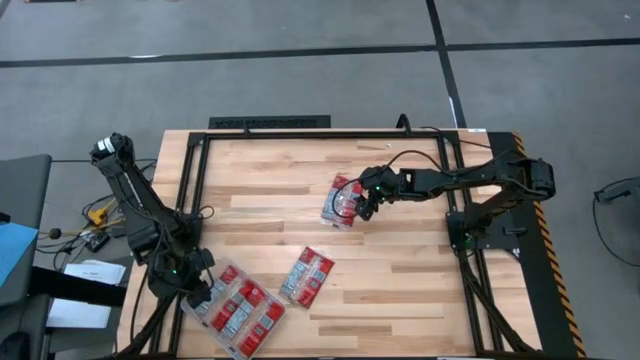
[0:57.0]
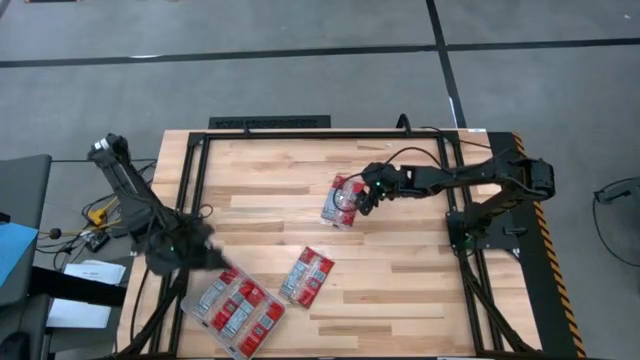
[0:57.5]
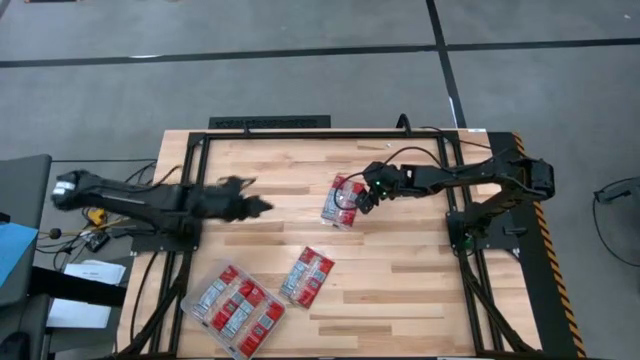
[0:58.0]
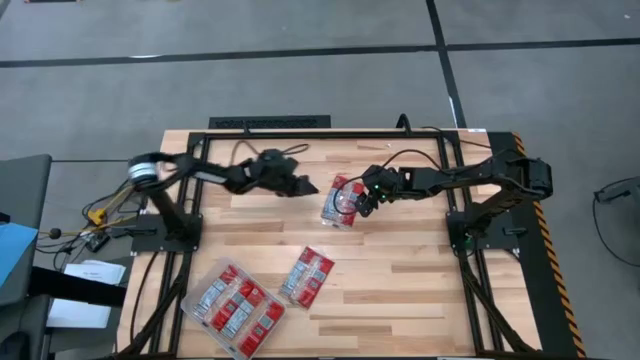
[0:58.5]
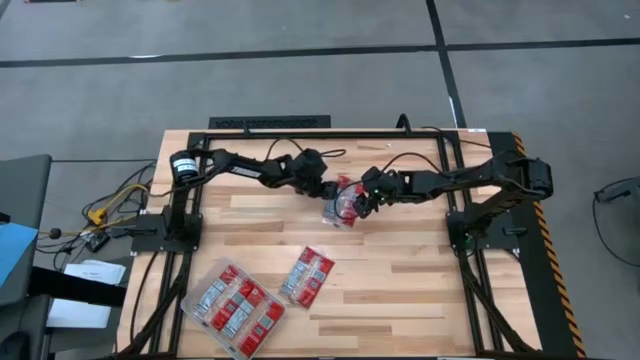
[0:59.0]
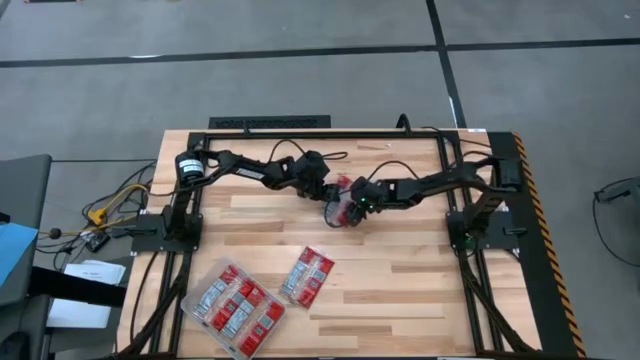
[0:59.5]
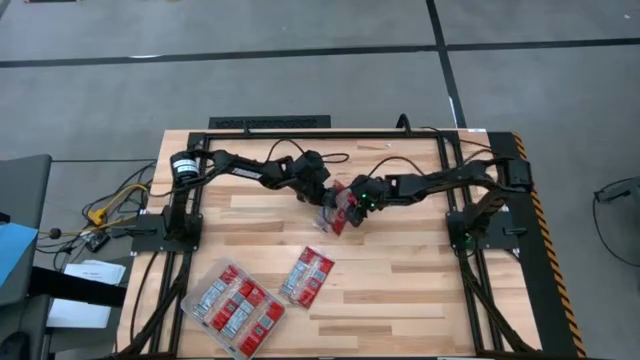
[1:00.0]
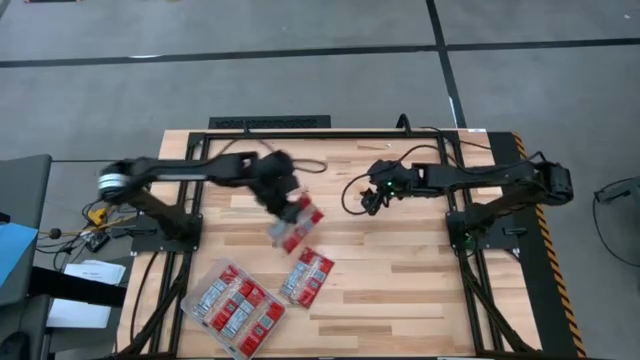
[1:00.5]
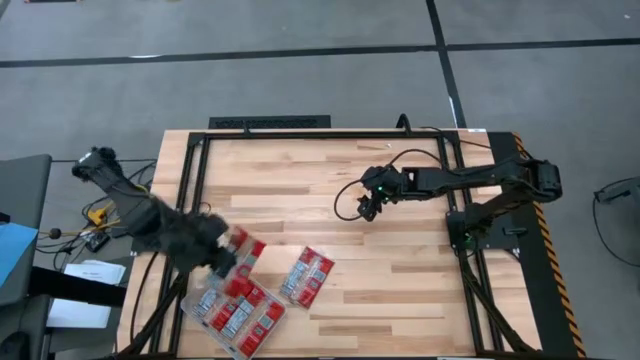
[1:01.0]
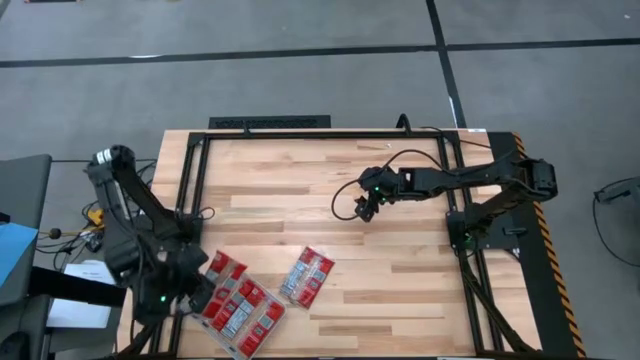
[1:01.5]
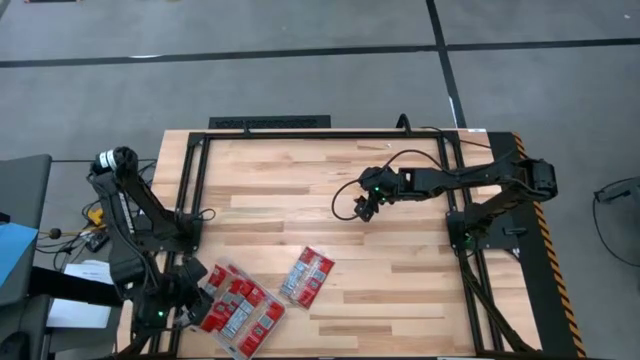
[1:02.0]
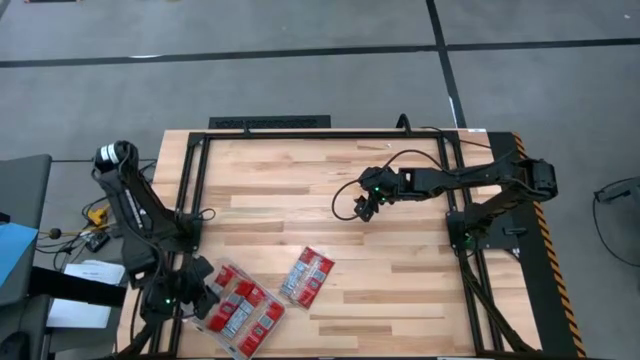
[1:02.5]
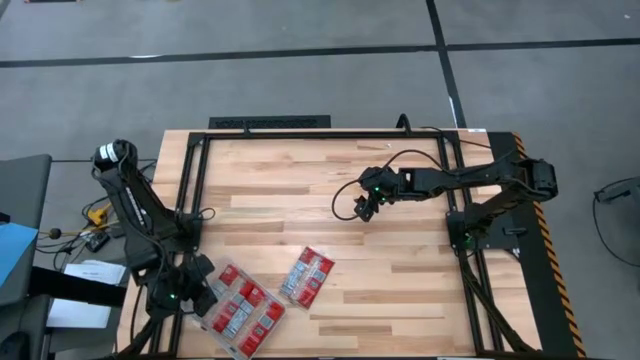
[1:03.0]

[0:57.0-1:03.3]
Task: Sort popcorn bags into baskets
Put the red popcorn bag into the transparent bin

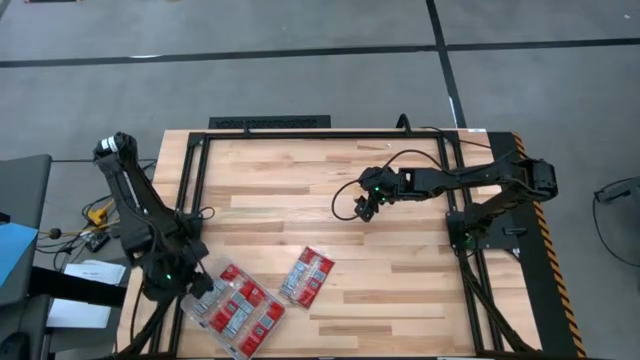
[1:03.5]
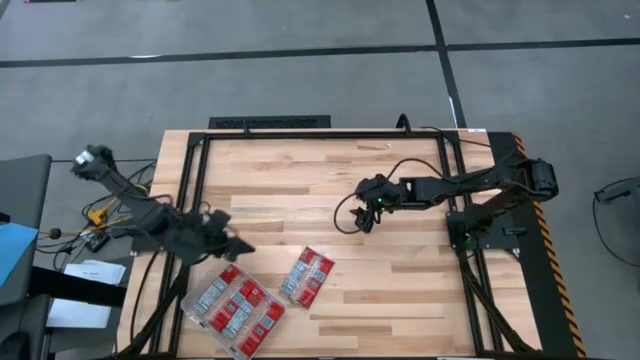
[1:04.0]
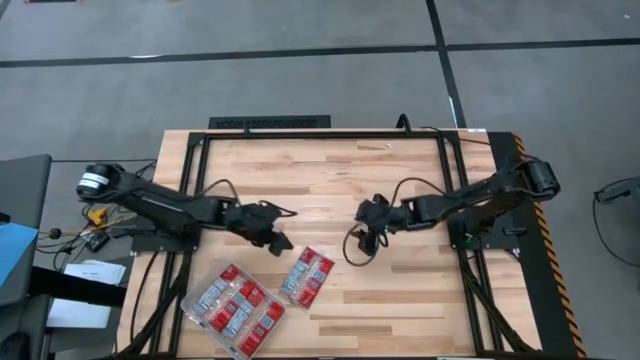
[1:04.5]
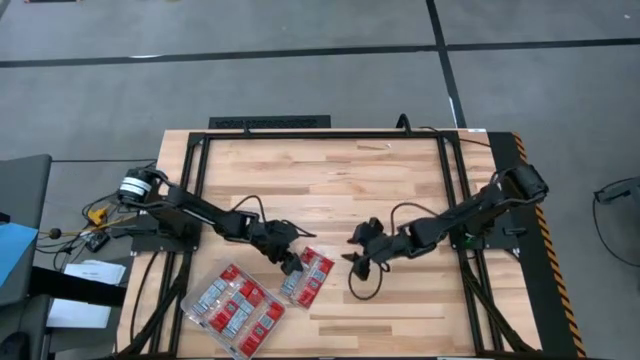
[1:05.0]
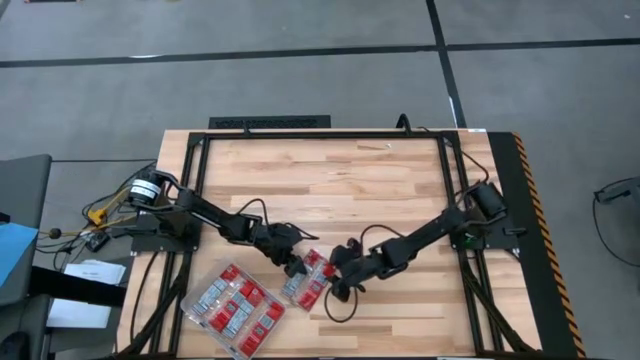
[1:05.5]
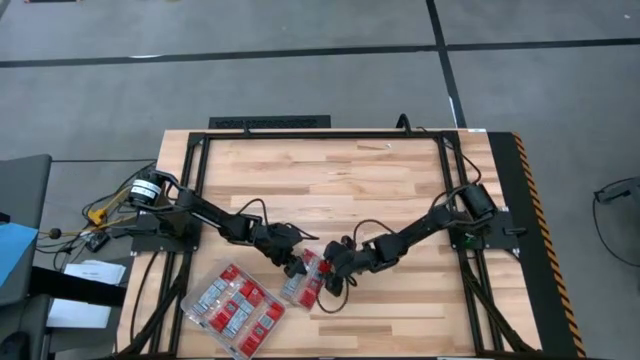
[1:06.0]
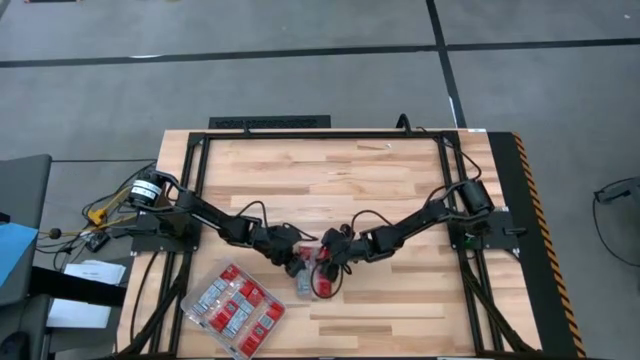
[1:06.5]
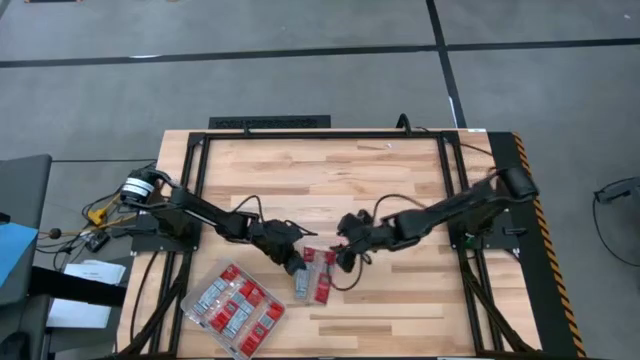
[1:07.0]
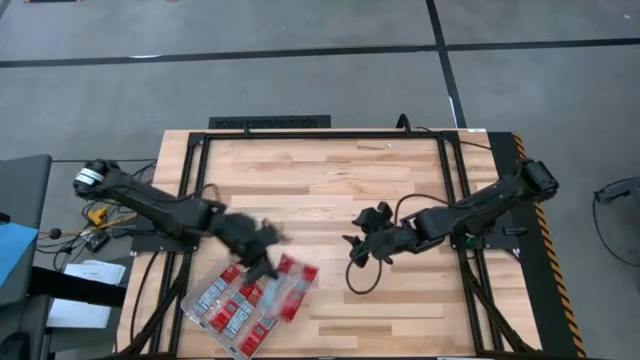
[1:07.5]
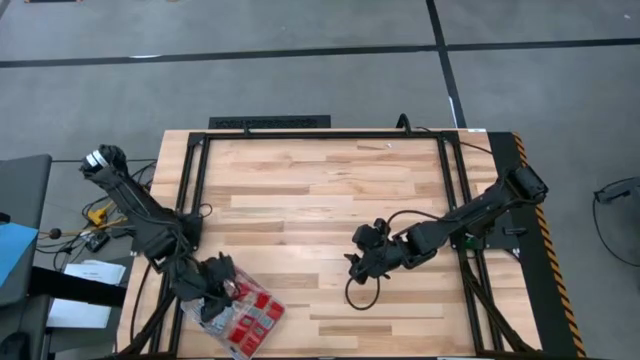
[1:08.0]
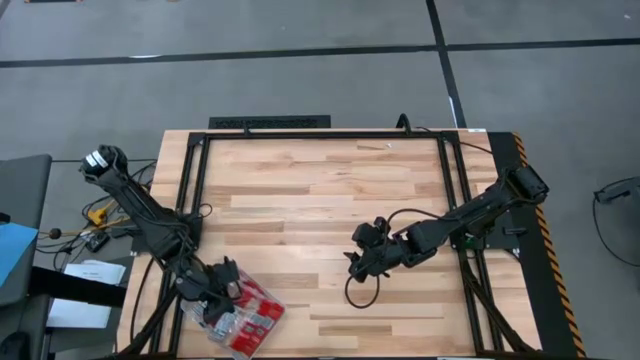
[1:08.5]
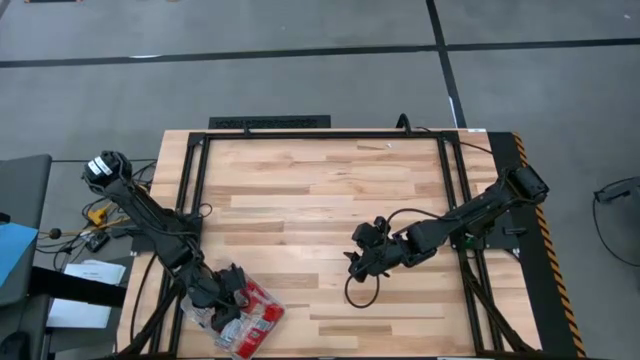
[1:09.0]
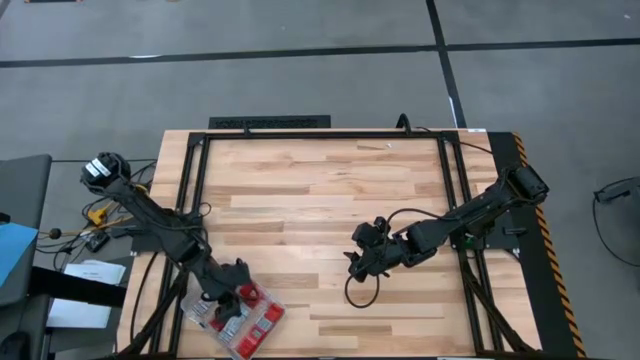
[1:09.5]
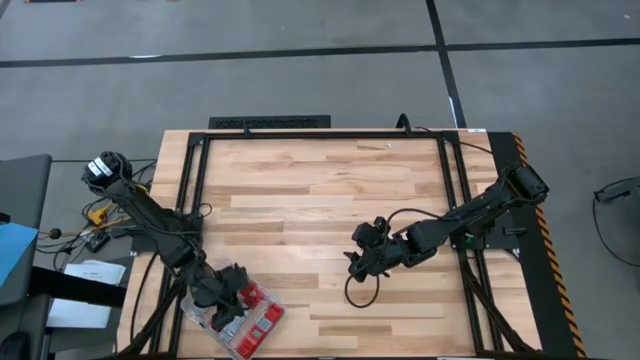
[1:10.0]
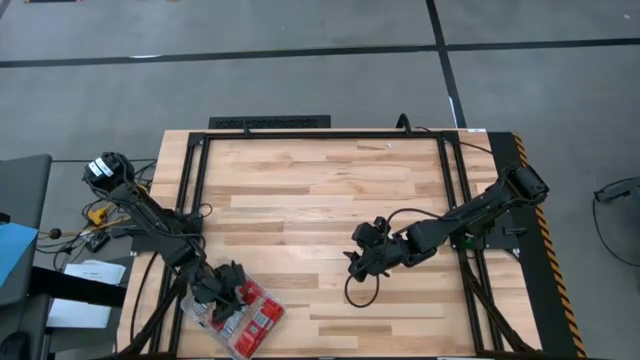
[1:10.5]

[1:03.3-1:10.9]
Put the red popcorn bag into the transparent bin

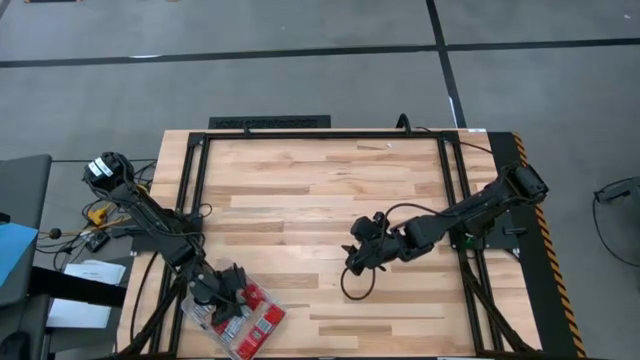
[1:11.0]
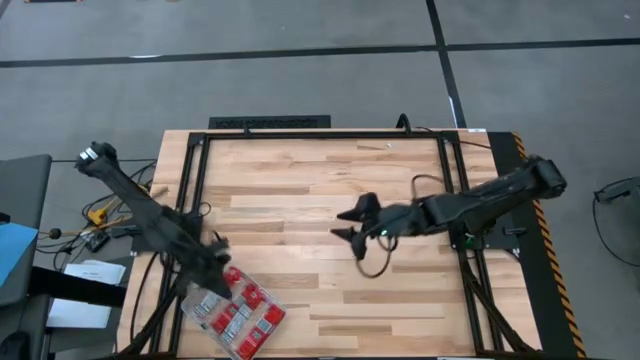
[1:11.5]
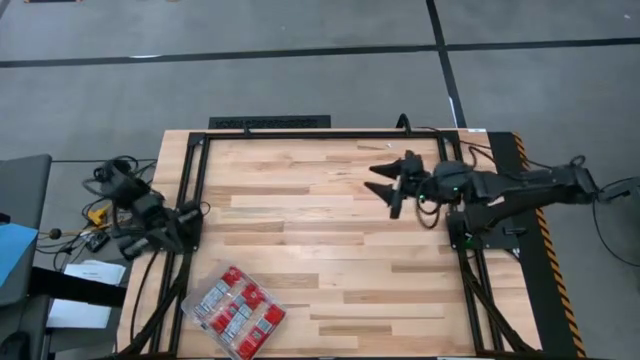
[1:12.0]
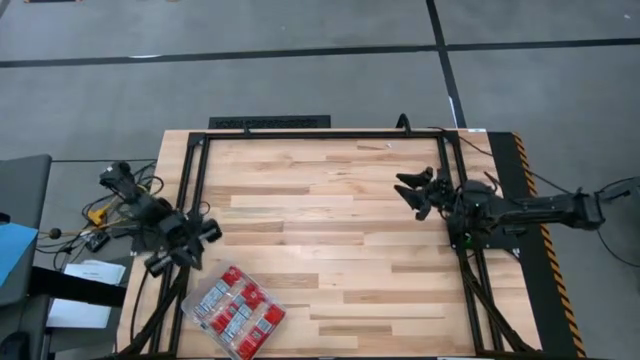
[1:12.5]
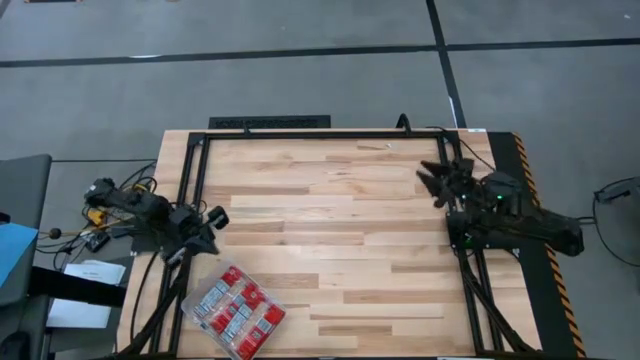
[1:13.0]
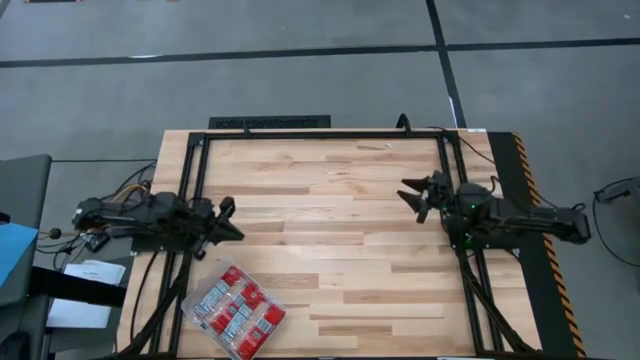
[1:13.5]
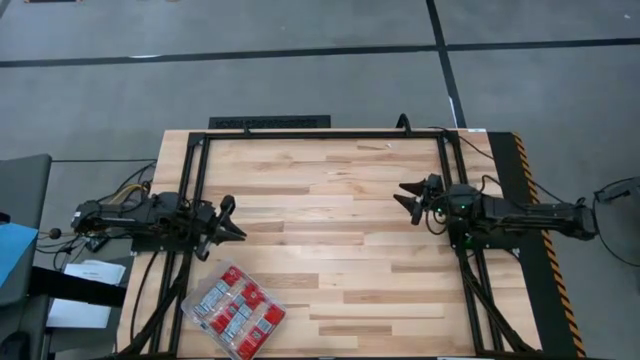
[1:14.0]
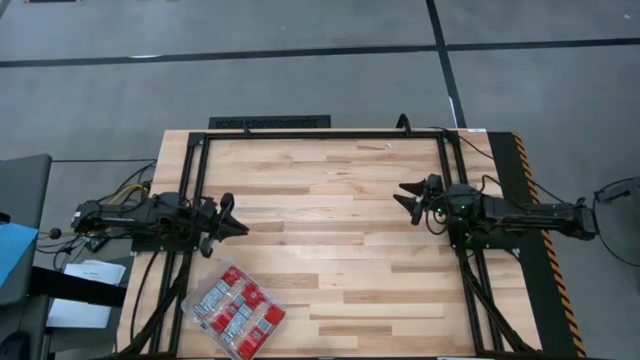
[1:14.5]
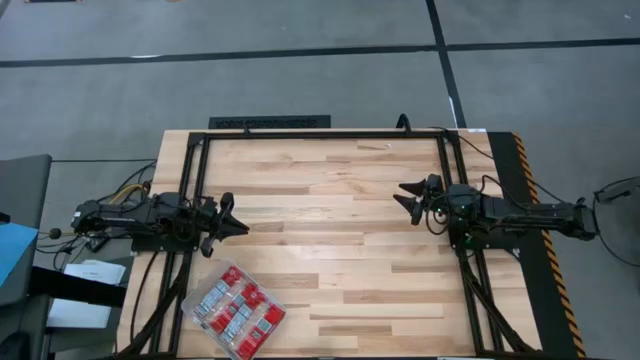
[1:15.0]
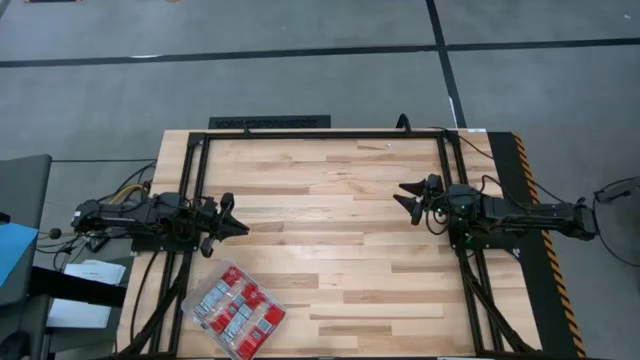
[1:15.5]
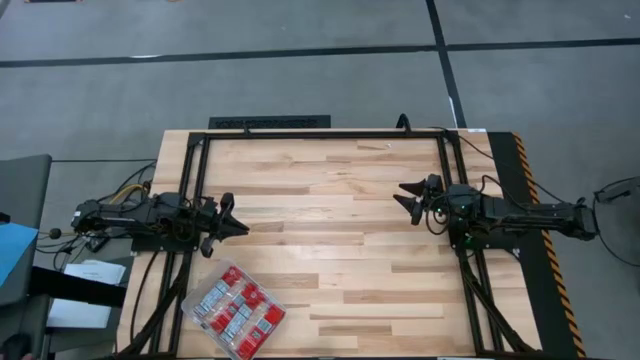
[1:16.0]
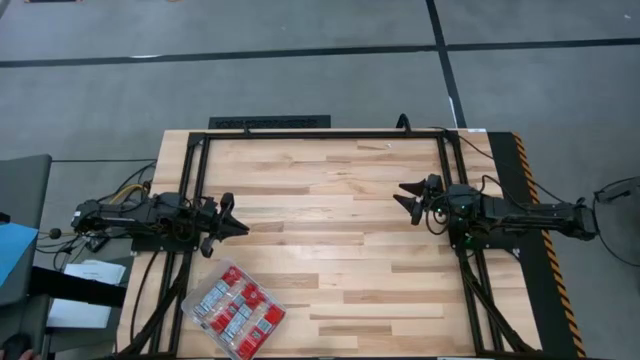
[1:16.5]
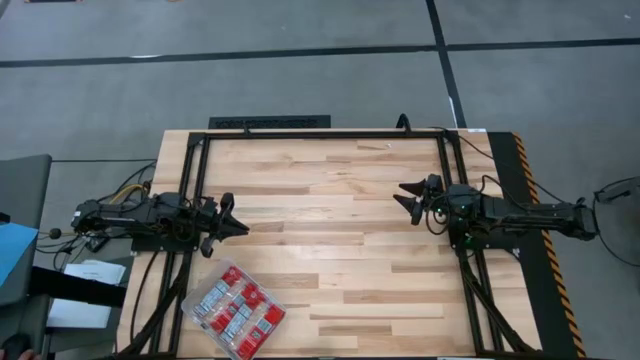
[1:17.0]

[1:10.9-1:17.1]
Return to Home Position

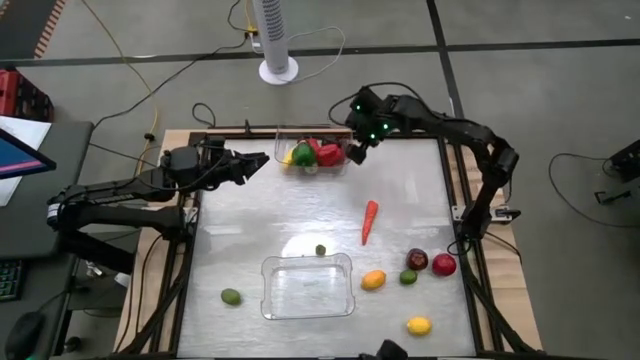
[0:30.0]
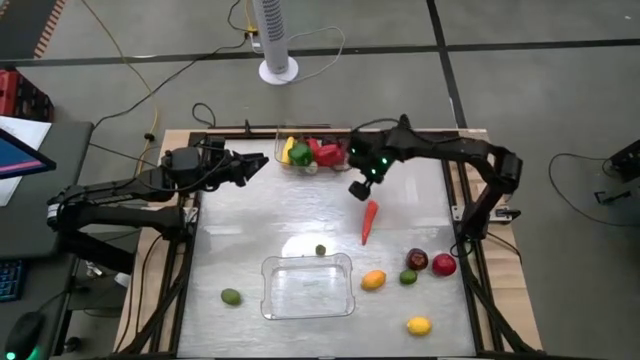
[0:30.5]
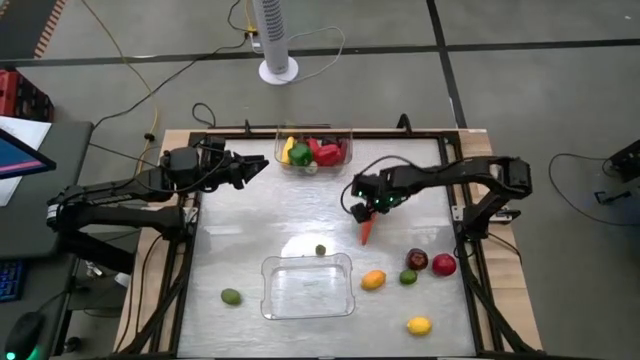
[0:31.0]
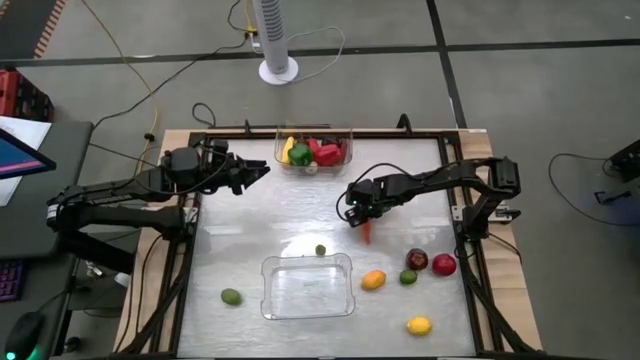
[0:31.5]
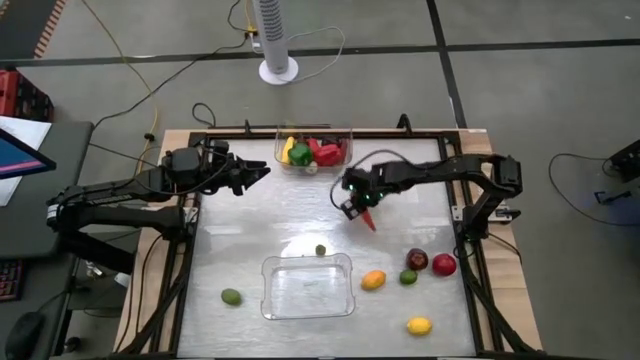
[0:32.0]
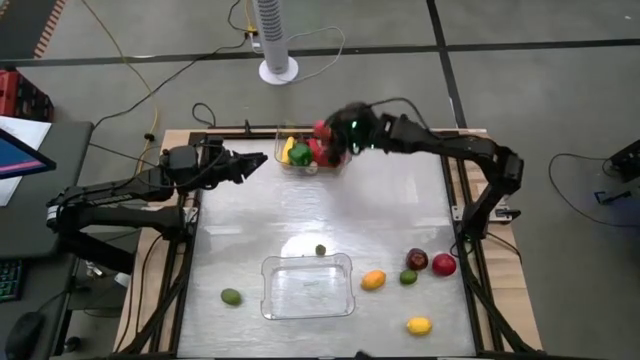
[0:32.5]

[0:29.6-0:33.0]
Task: Sort produce into baskets
Put the carrot into the top transparent bin
